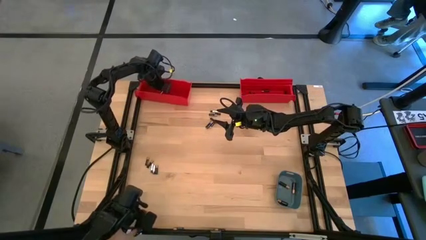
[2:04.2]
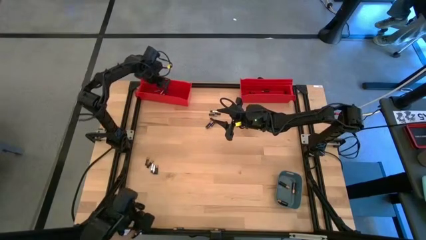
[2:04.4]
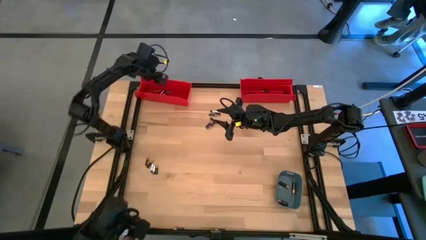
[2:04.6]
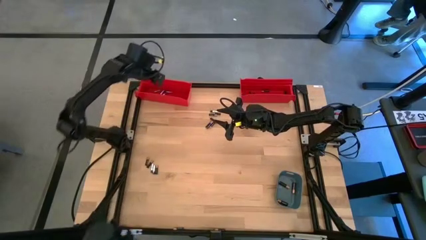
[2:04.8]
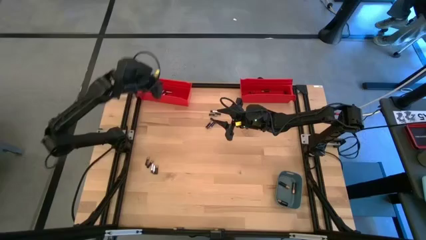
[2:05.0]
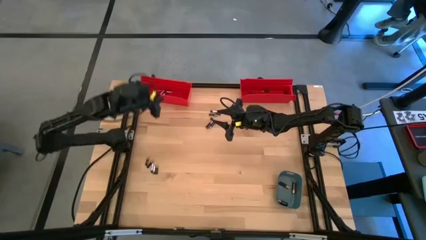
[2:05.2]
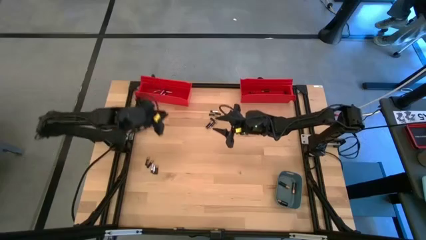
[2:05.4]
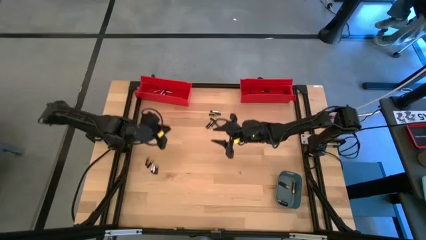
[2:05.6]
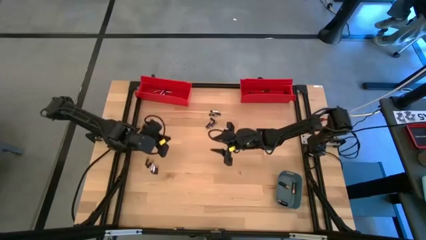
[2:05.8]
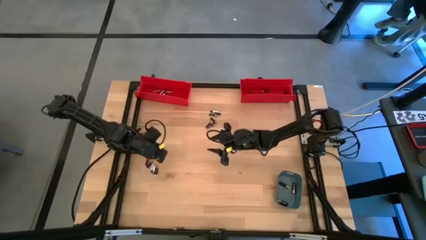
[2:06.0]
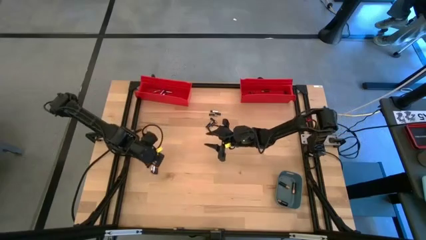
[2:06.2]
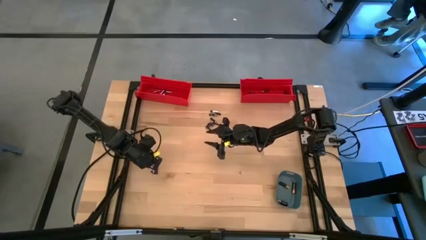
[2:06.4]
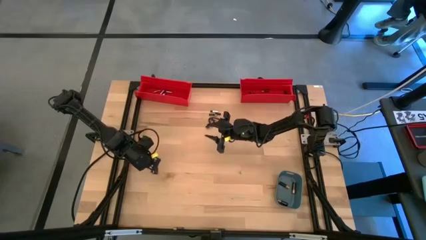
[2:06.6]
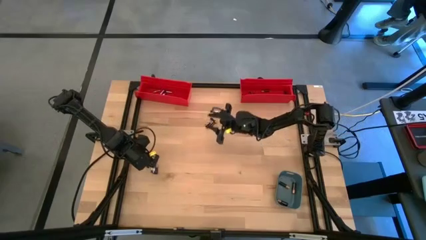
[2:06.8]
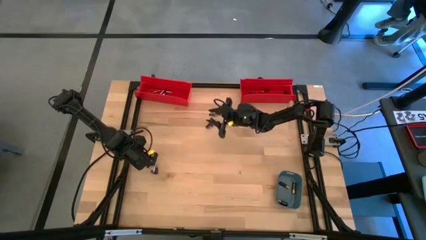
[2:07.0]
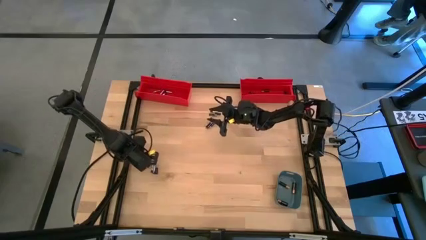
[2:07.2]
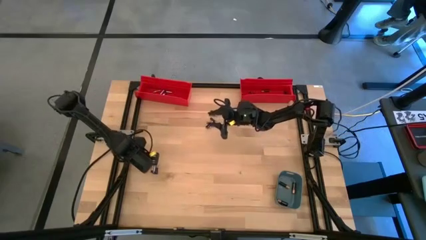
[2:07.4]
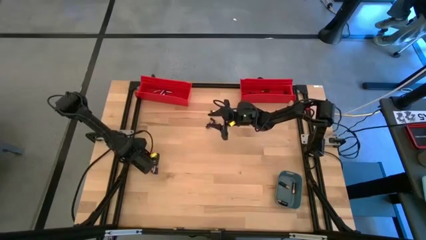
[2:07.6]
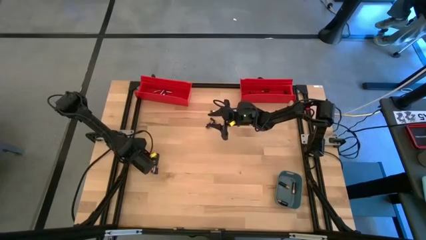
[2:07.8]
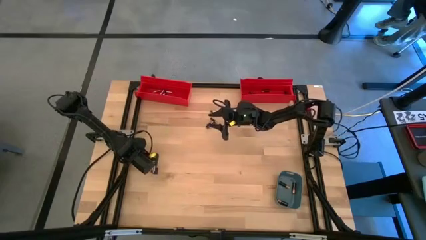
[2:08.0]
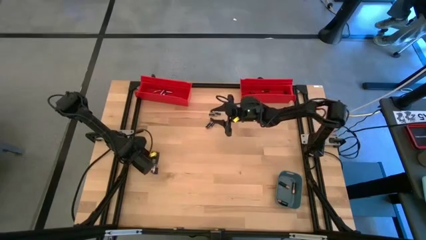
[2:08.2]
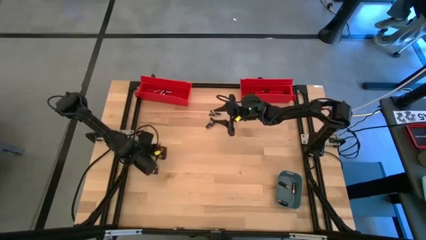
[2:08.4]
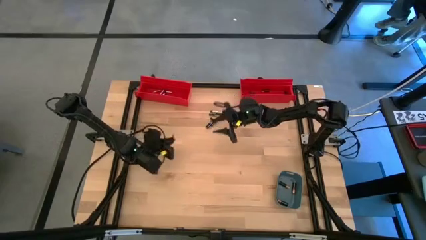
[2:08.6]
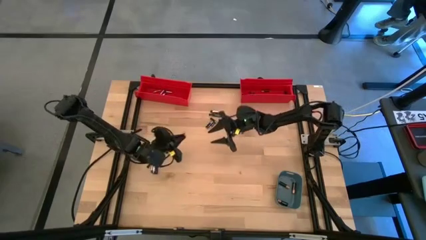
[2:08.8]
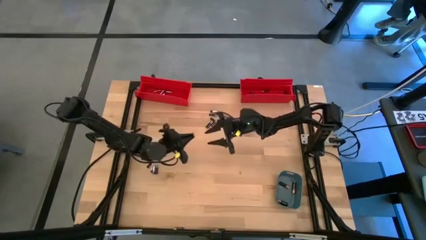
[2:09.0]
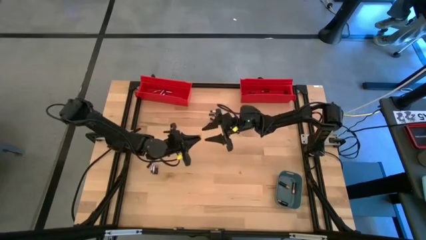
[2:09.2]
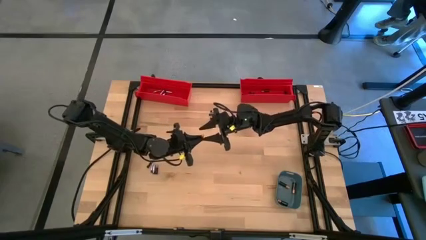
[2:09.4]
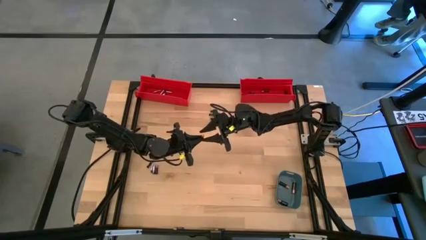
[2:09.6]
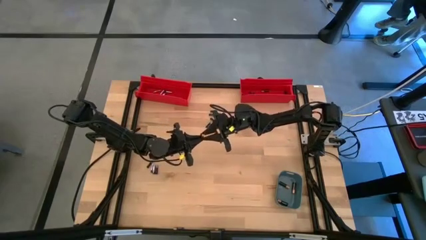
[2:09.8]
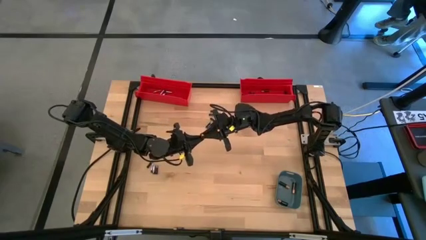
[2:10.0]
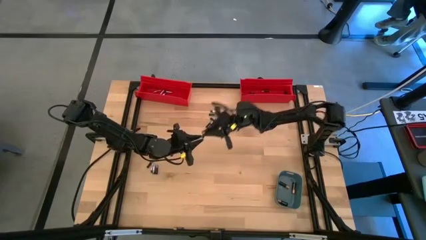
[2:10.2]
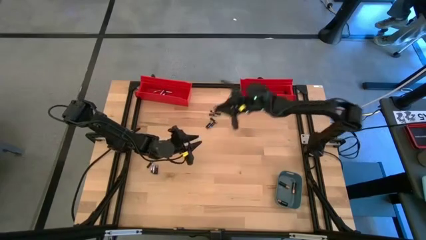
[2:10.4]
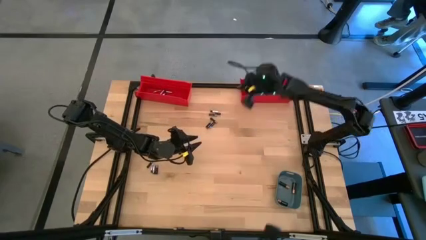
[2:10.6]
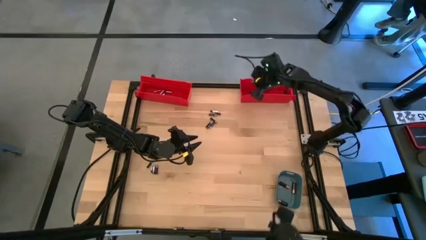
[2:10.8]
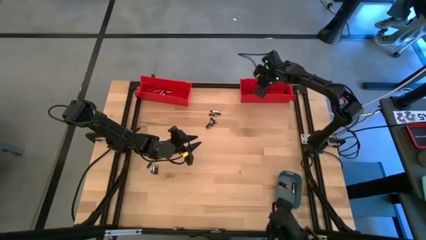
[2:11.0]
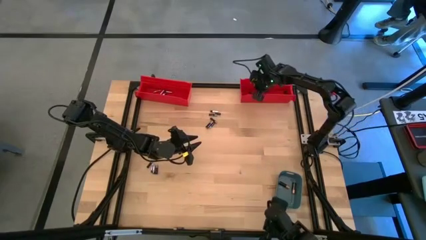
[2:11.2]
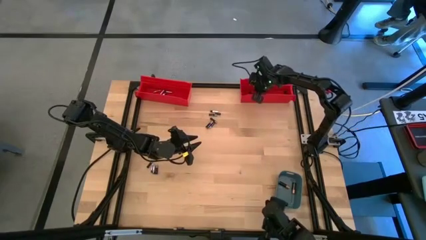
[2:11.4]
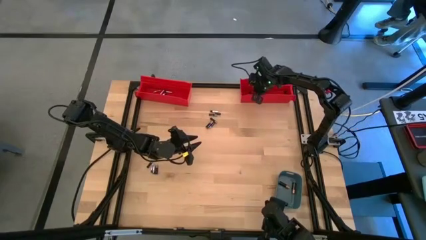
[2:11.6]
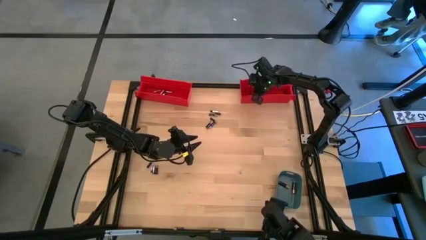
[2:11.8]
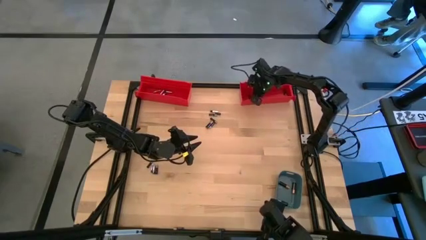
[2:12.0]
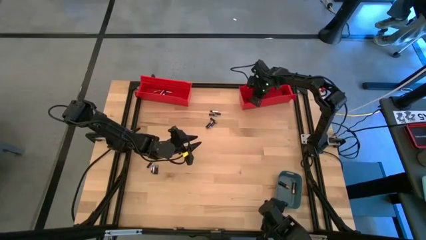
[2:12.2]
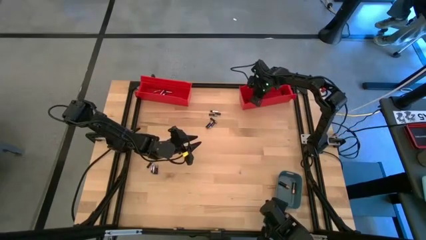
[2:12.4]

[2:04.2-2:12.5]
Task: Sort batteries
Put the small black battery into the right red bin

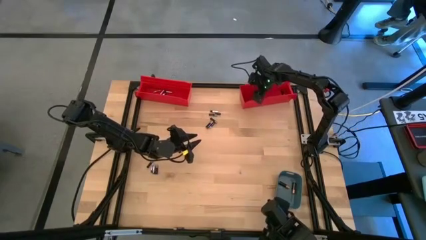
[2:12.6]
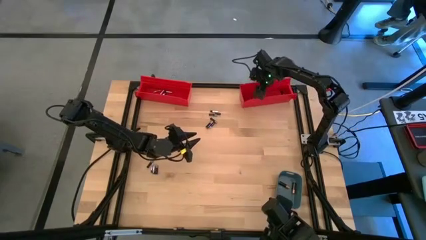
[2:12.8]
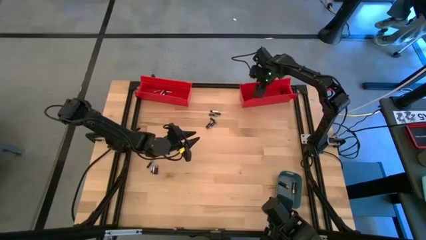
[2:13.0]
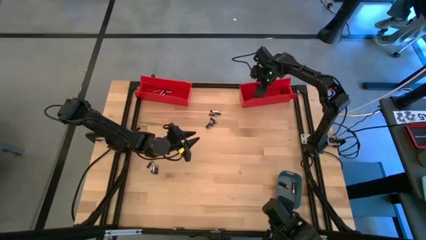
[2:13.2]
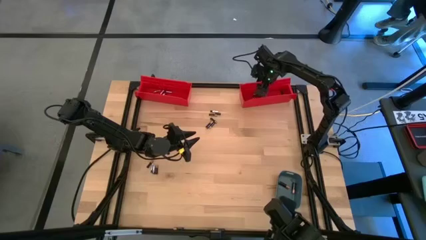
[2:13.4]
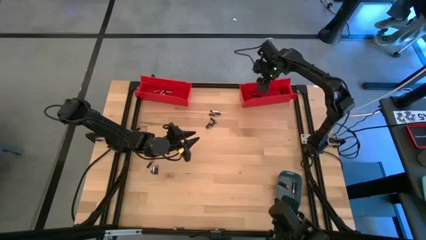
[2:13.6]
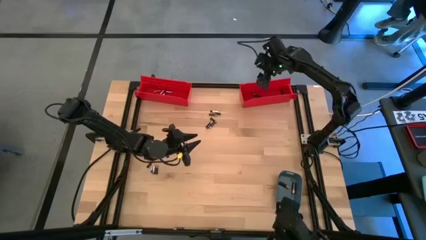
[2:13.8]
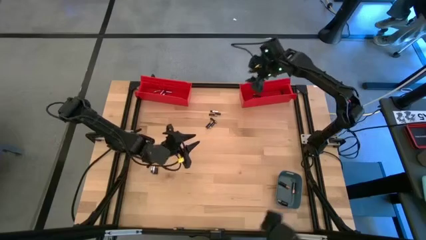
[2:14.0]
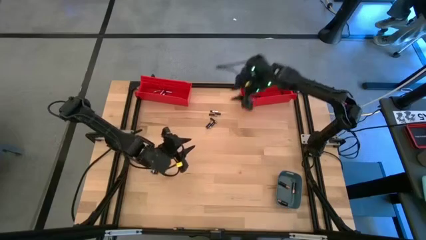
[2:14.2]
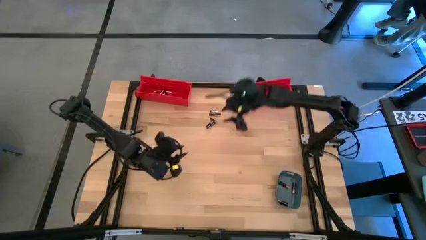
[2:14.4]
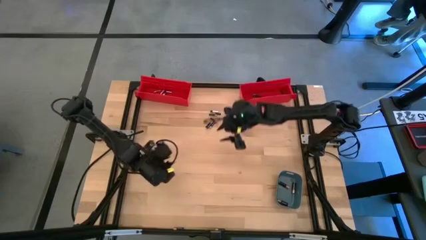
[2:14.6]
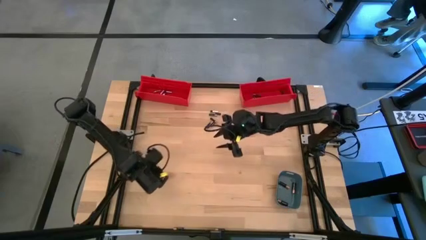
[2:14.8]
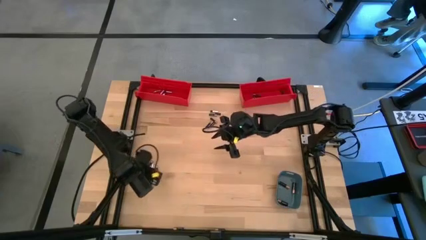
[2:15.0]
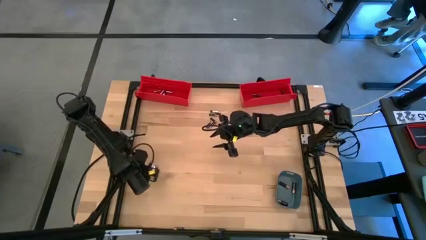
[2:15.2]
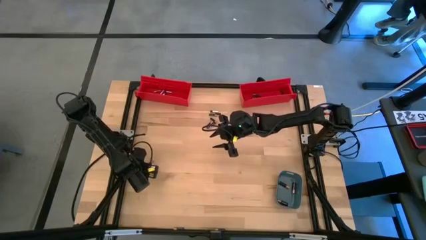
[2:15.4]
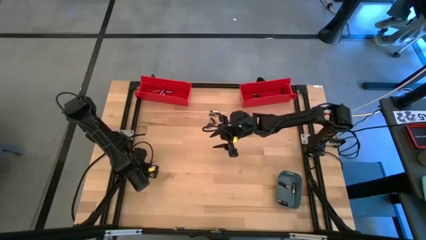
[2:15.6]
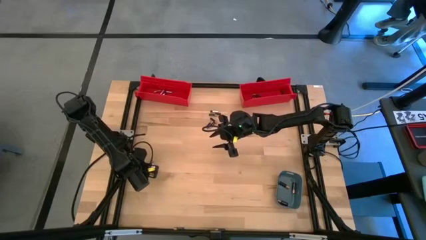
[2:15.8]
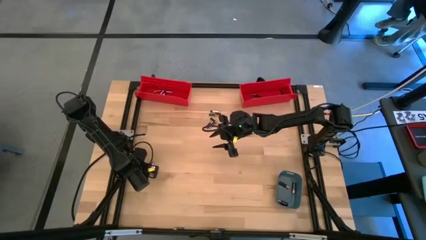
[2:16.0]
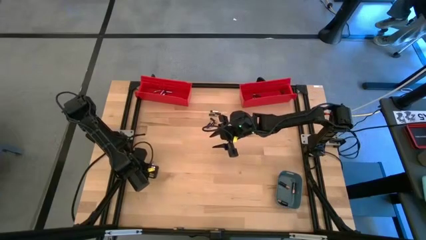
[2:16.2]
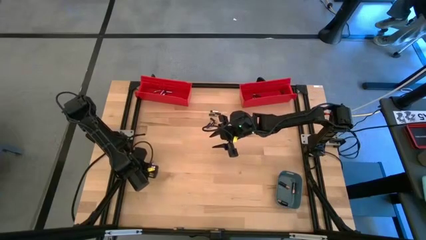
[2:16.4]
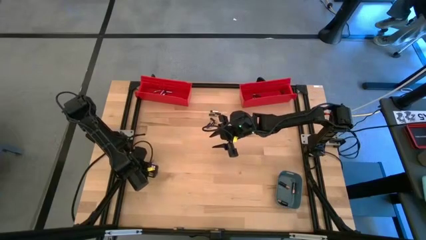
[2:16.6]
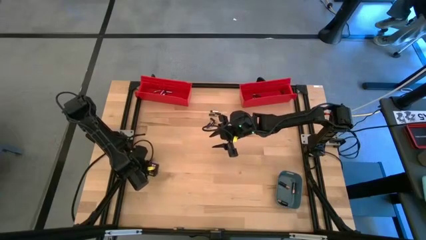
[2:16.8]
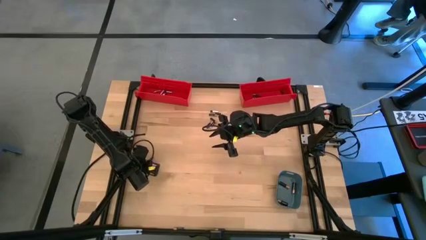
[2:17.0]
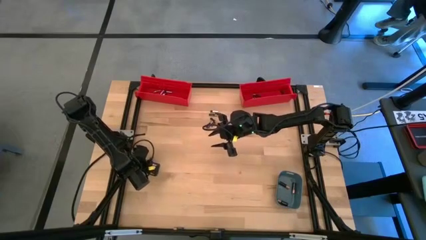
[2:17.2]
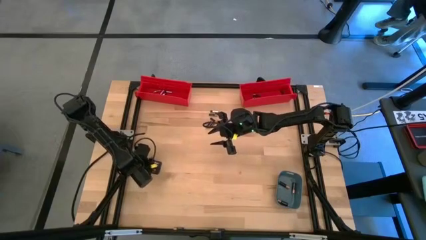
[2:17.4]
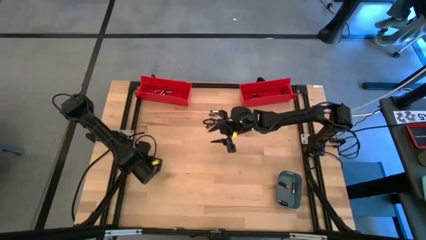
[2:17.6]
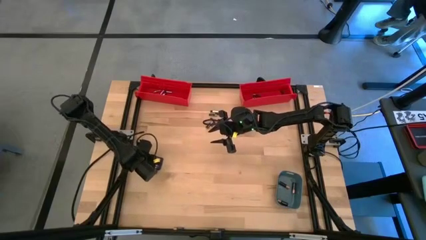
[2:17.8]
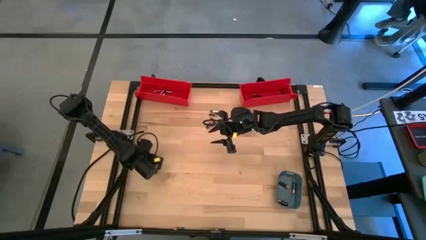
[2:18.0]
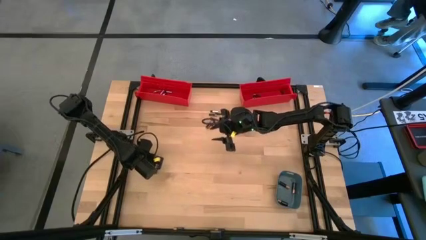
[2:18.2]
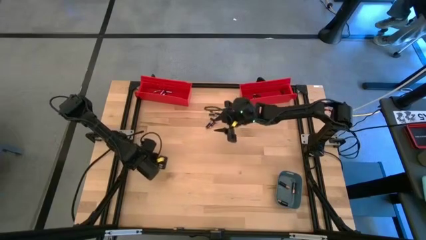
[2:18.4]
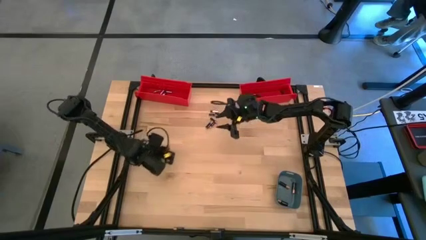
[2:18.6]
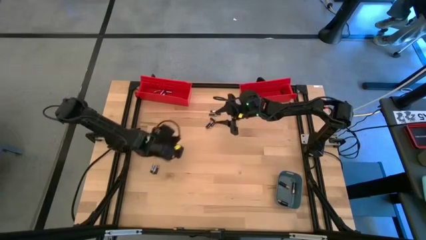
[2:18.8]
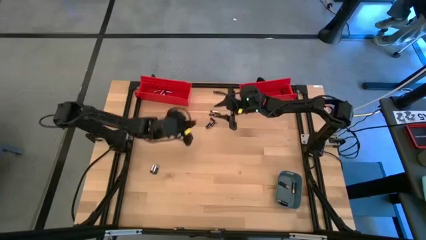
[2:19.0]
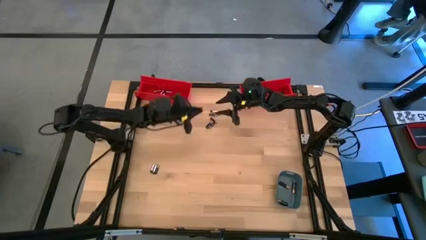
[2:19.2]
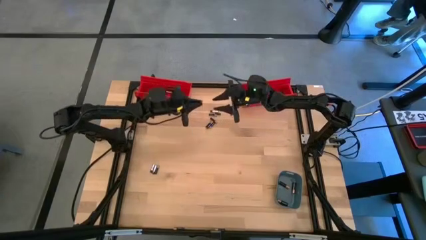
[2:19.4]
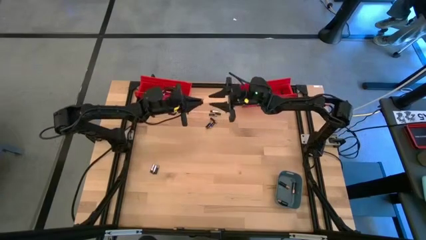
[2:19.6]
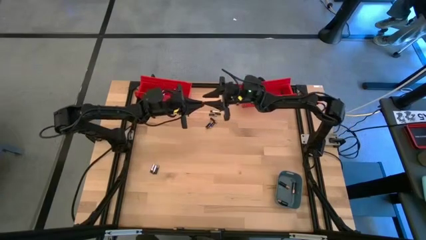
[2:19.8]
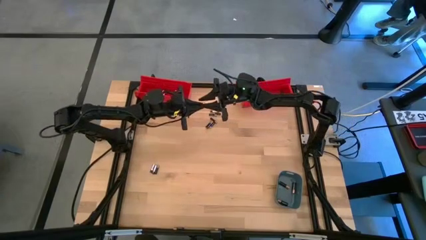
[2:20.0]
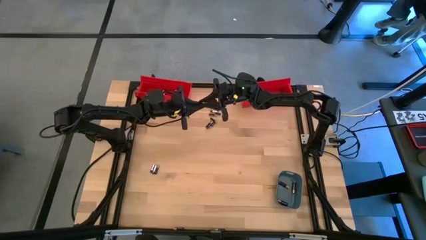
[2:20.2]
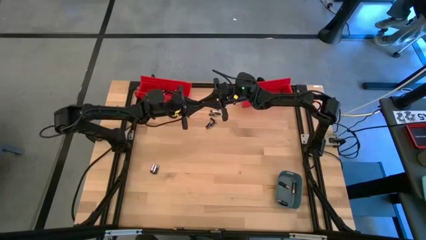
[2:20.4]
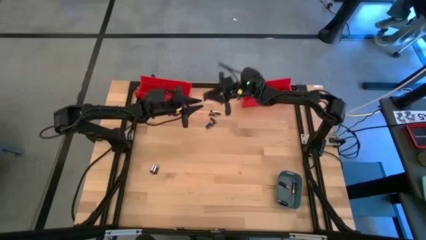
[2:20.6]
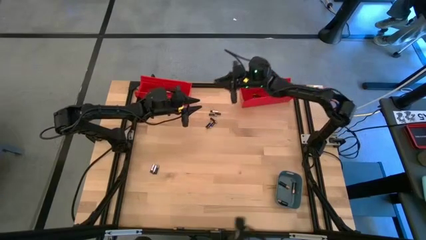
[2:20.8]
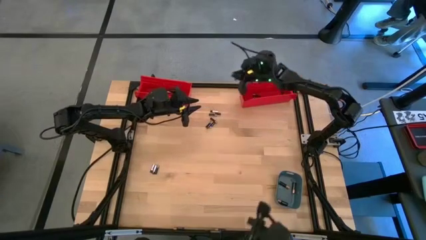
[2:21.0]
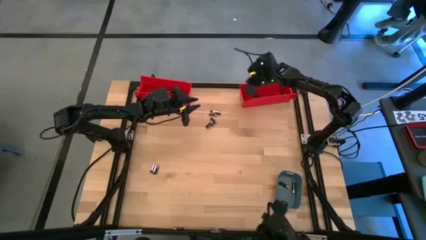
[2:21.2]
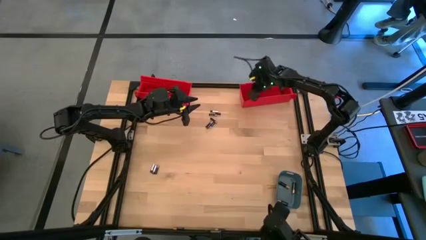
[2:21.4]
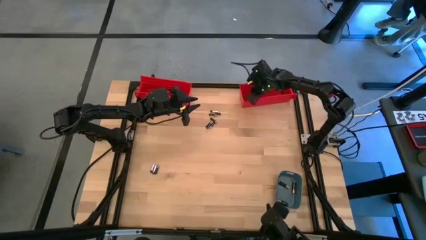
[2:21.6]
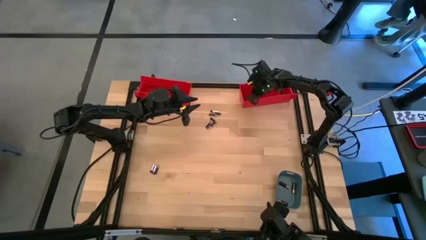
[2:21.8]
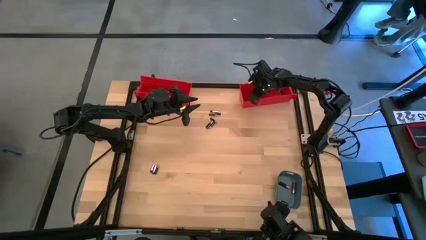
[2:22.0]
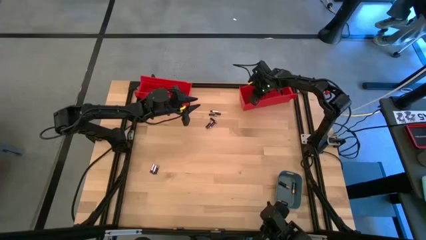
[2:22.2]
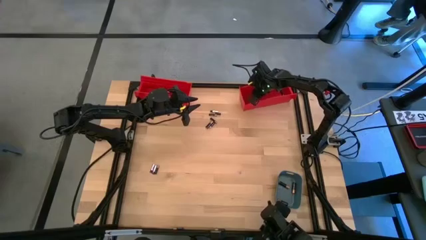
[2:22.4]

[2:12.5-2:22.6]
Put the small black battery into the right red bin
